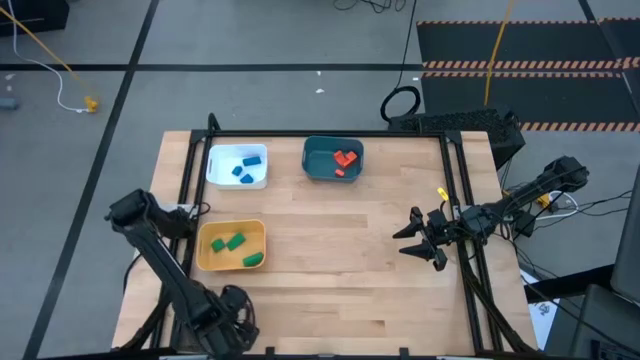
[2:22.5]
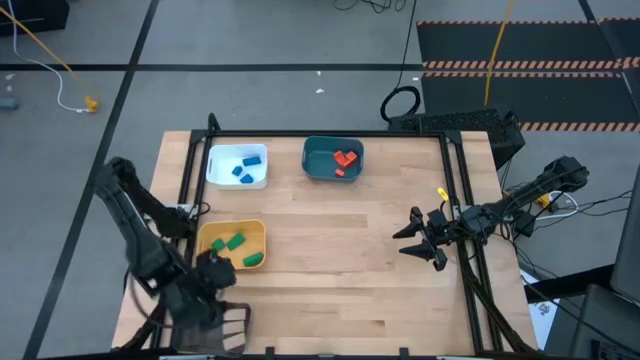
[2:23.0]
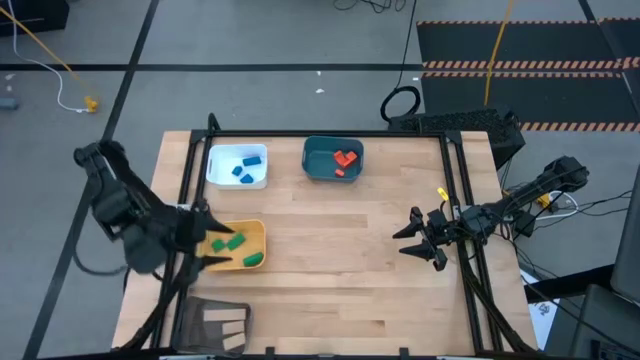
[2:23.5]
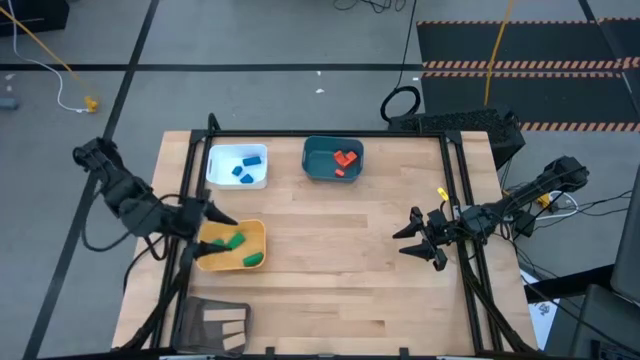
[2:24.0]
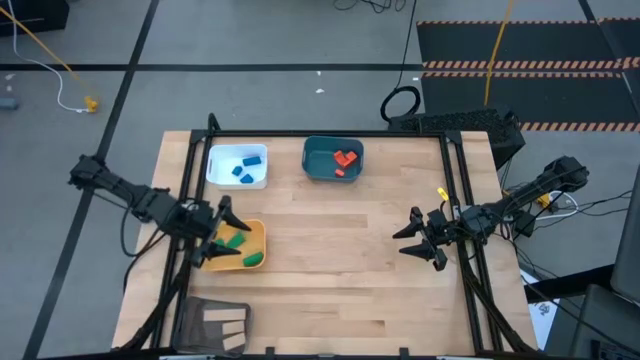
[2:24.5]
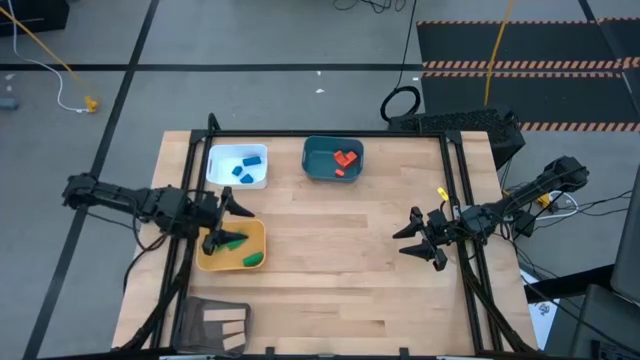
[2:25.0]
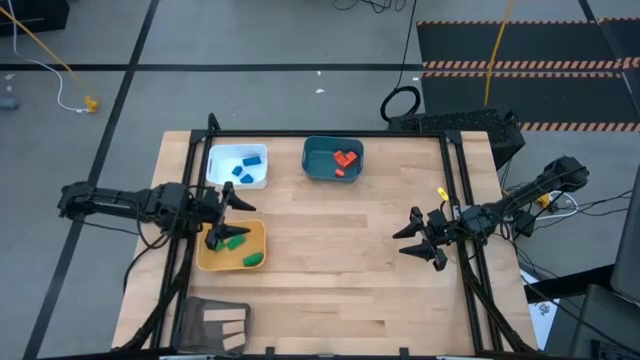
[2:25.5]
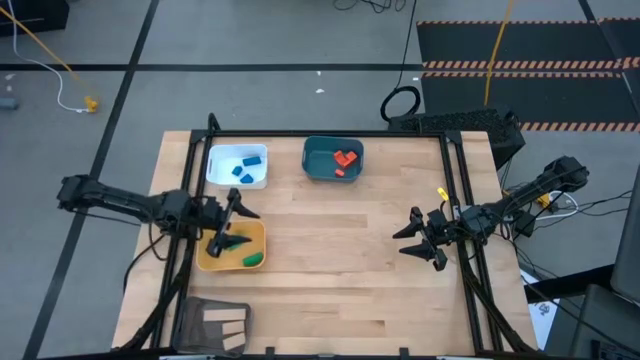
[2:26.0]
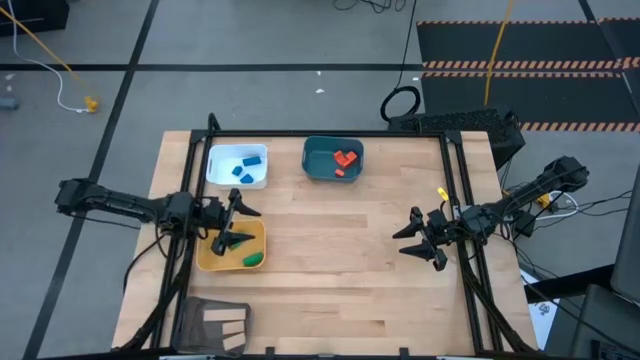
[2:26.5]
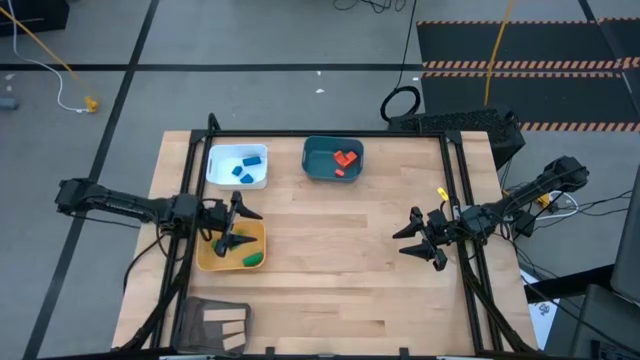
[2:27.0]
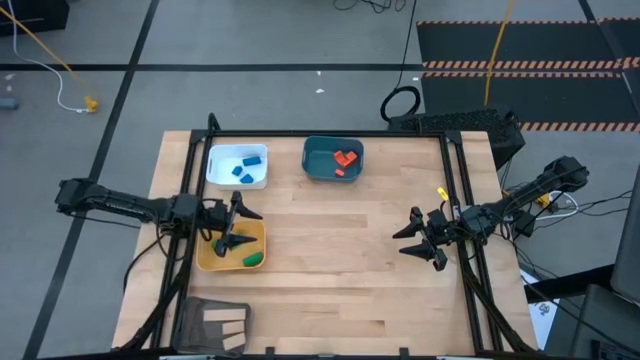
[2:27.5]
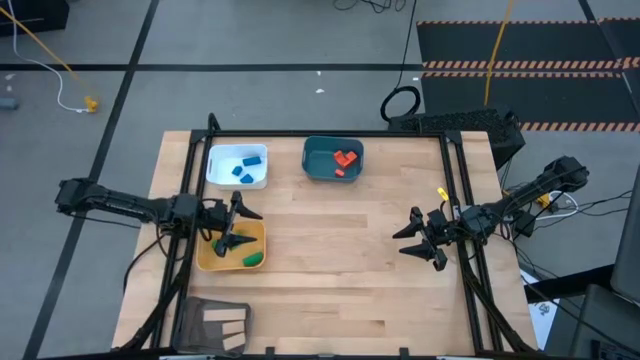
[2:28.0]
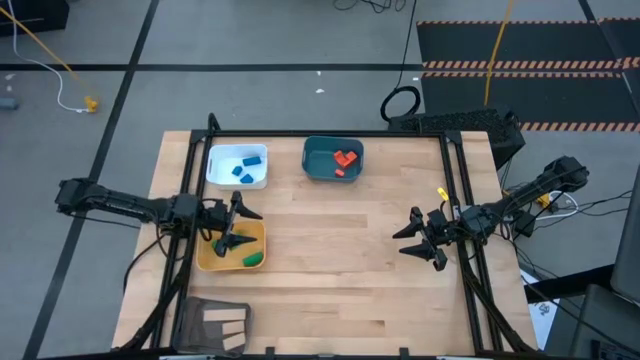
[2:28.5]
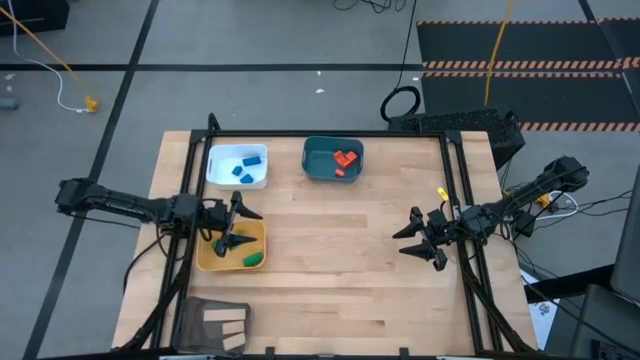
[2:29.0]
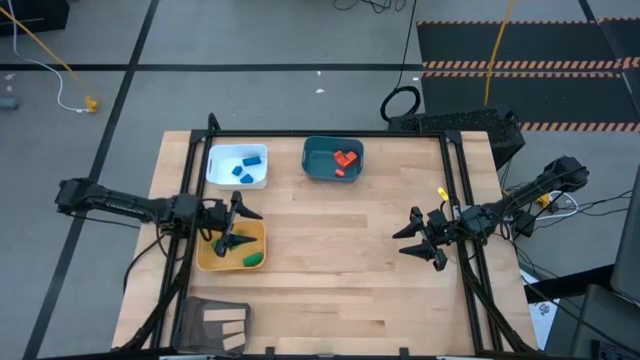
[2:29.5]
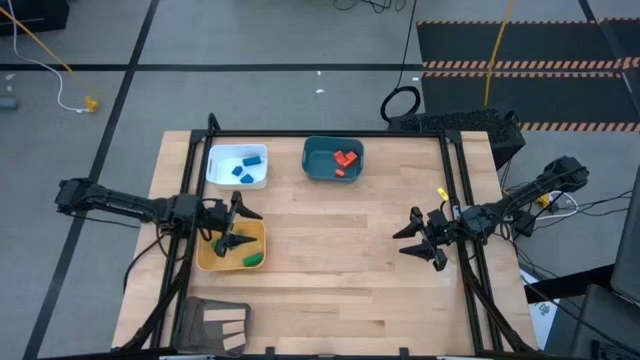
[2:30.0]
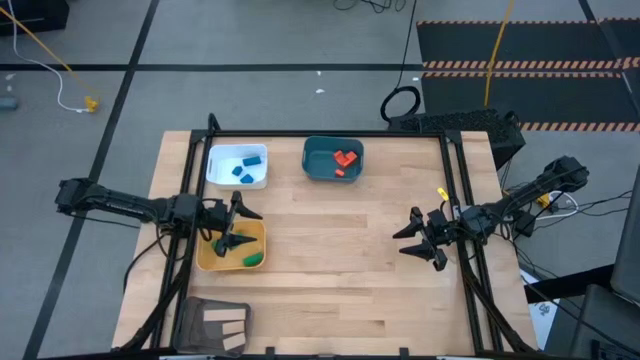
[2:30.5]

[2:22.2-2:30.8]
Task: Sort & place blocks by color
Return to Home Position

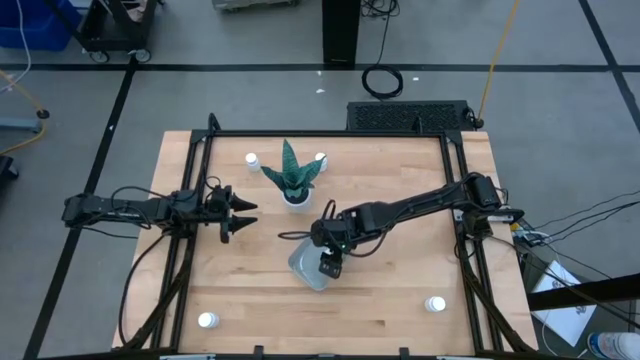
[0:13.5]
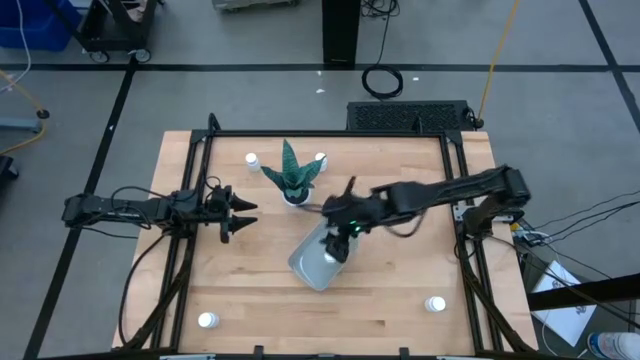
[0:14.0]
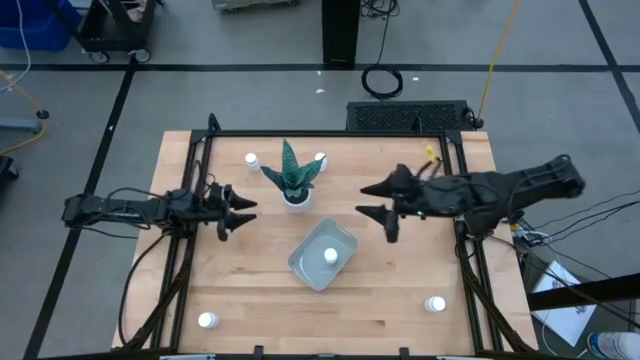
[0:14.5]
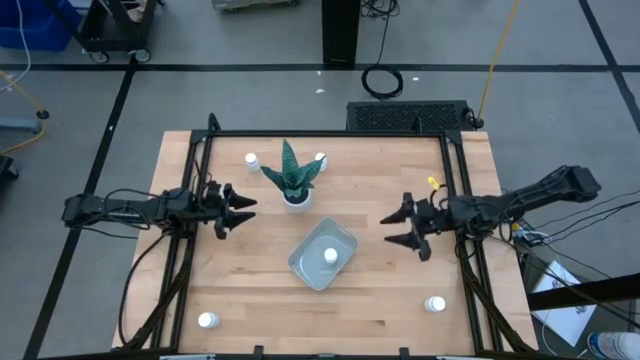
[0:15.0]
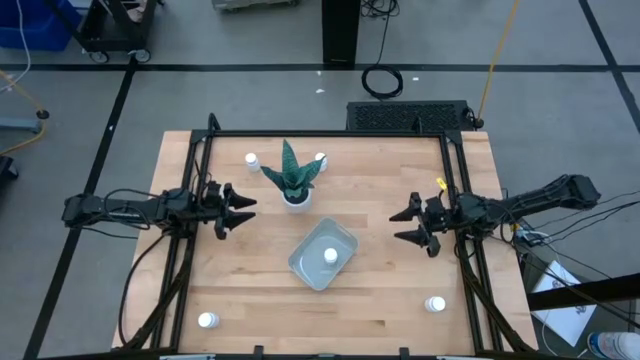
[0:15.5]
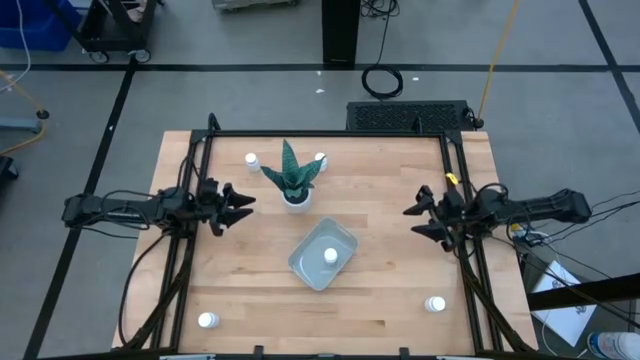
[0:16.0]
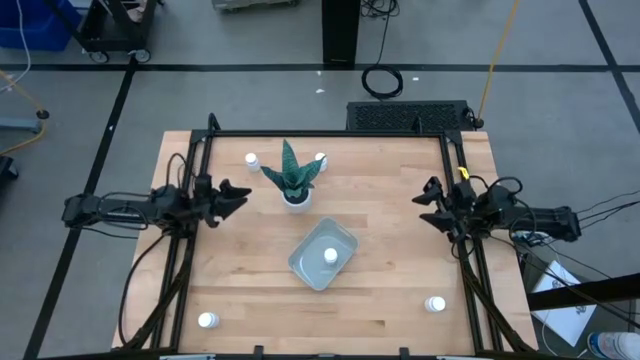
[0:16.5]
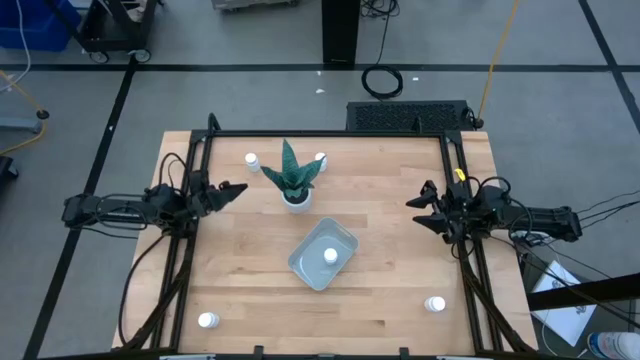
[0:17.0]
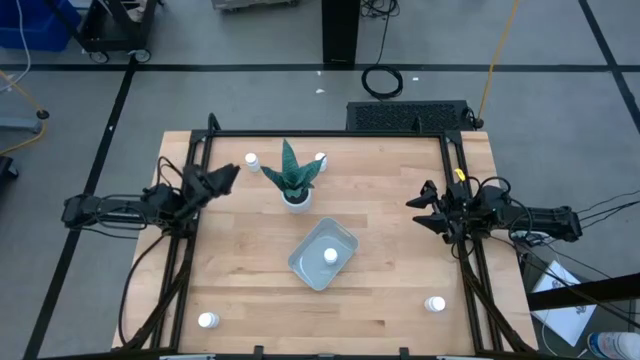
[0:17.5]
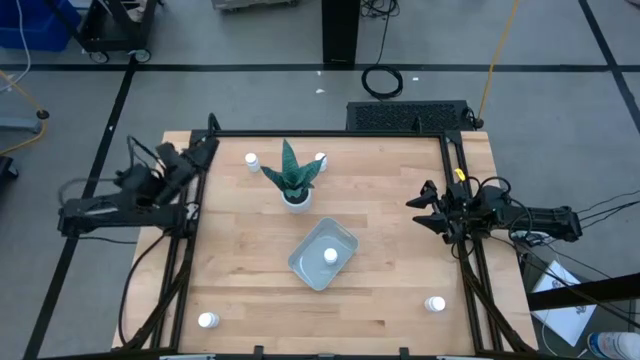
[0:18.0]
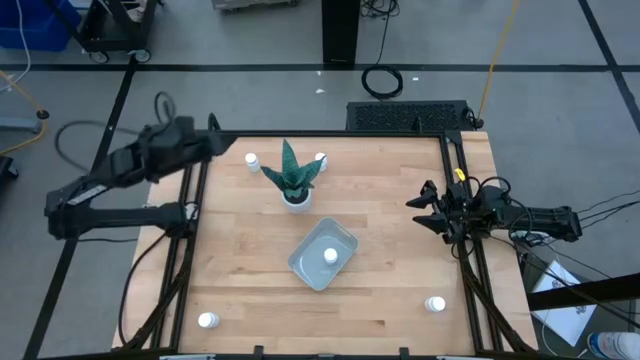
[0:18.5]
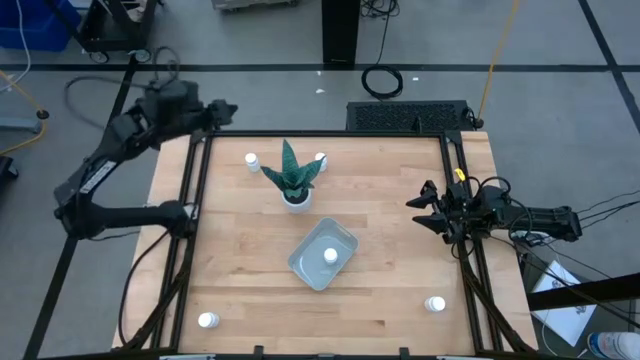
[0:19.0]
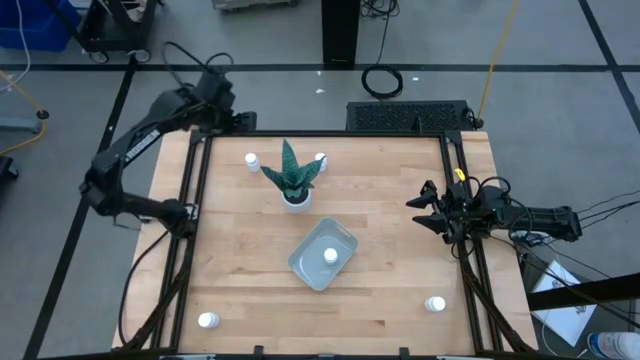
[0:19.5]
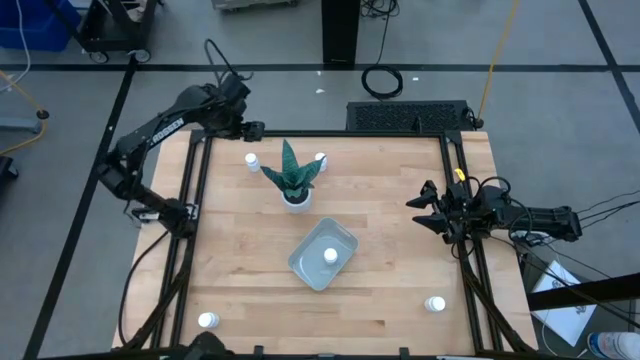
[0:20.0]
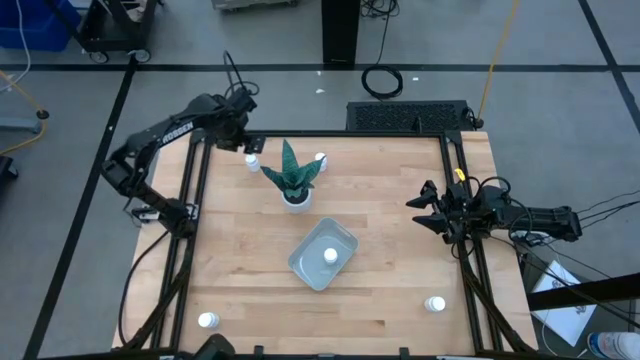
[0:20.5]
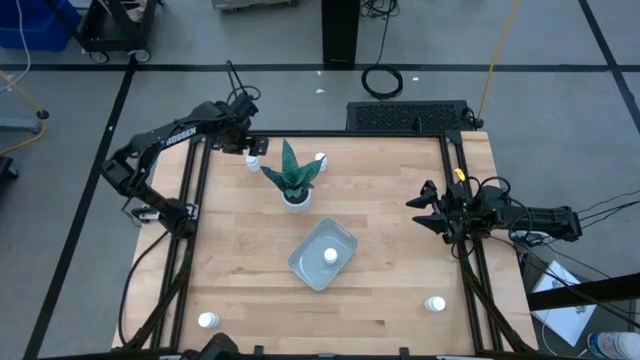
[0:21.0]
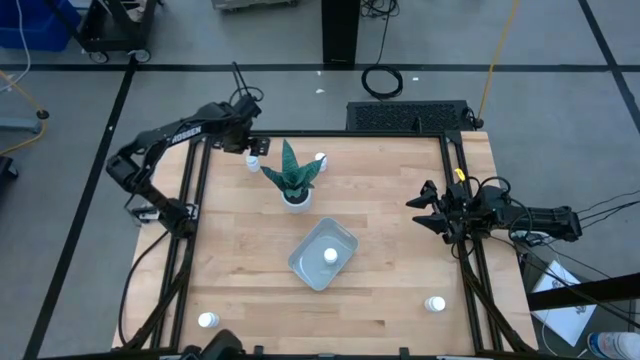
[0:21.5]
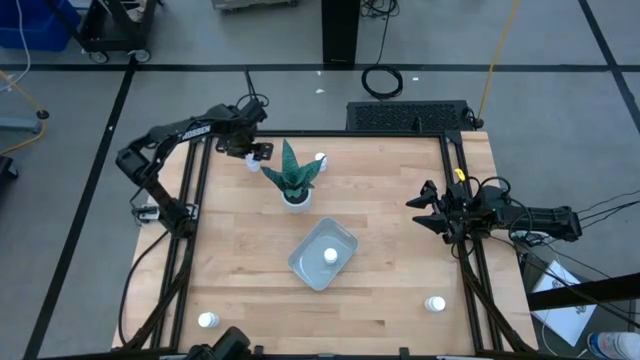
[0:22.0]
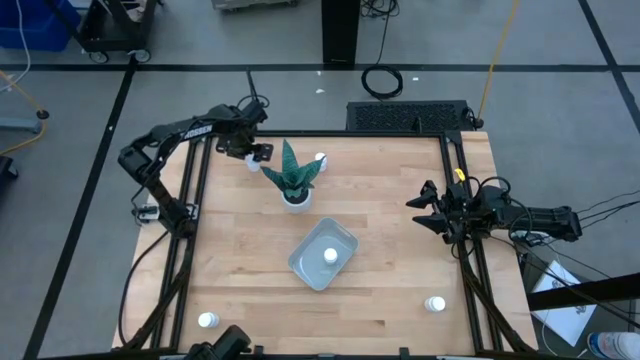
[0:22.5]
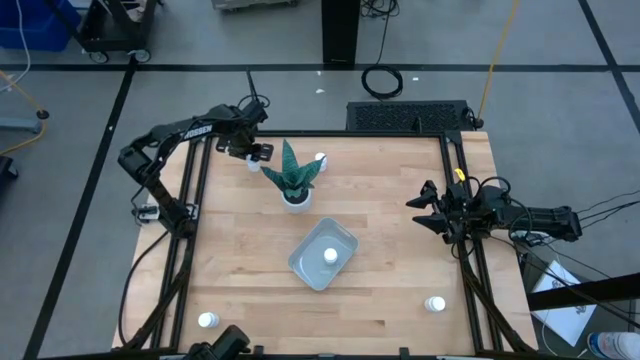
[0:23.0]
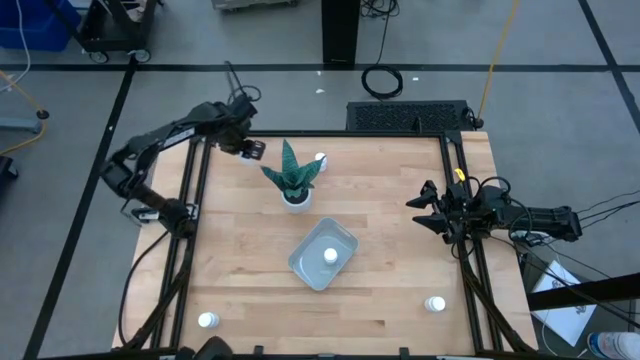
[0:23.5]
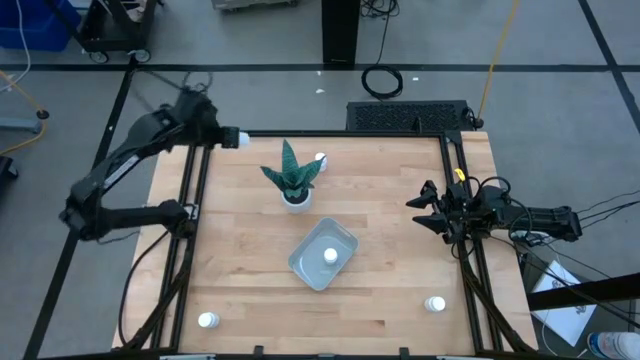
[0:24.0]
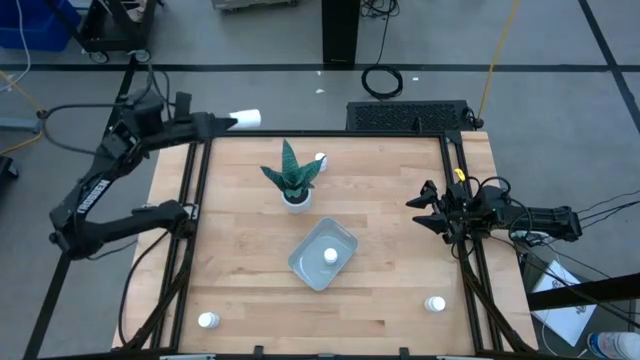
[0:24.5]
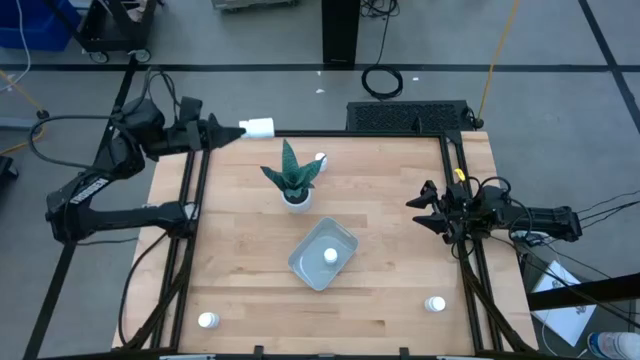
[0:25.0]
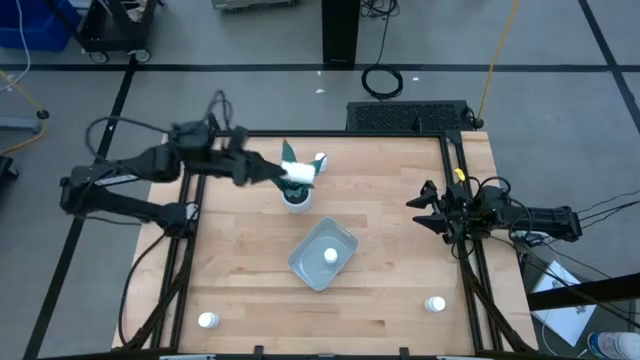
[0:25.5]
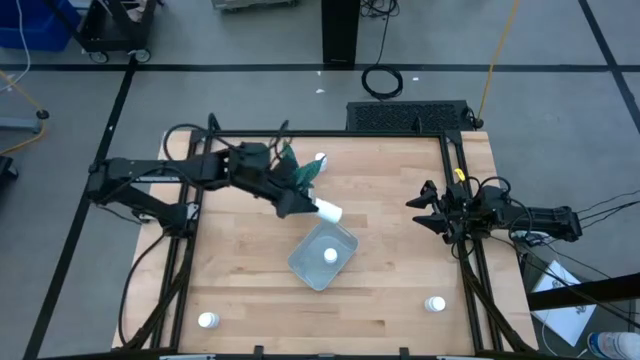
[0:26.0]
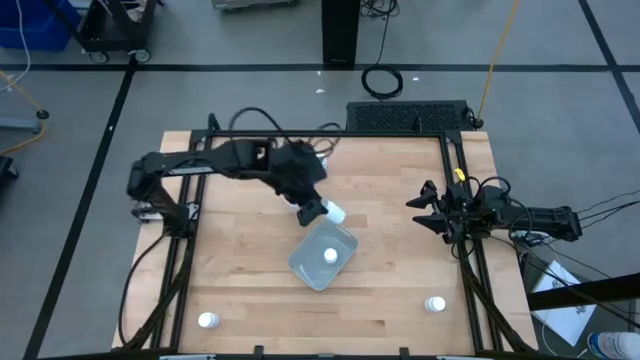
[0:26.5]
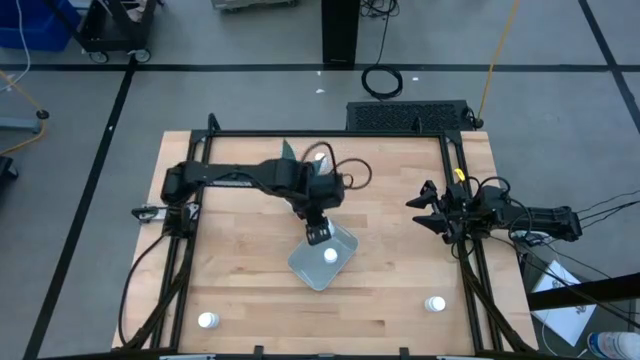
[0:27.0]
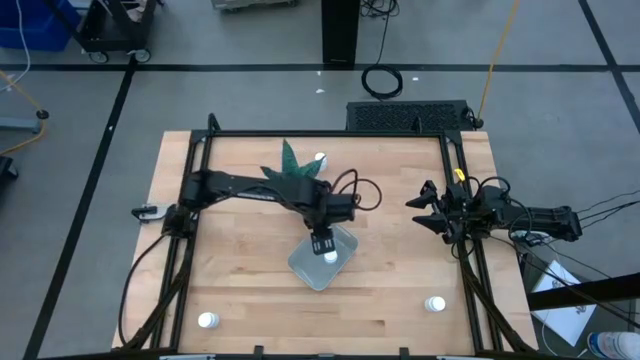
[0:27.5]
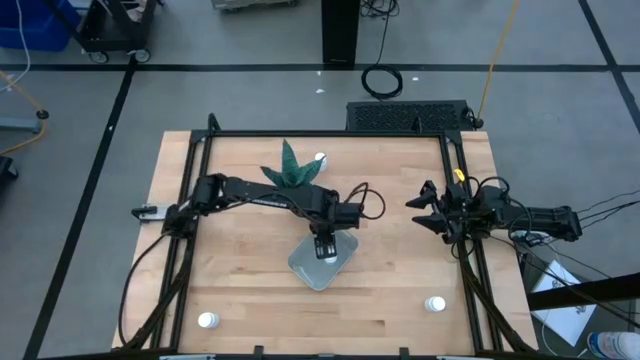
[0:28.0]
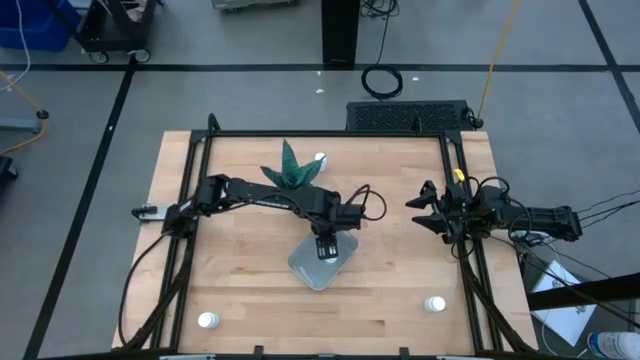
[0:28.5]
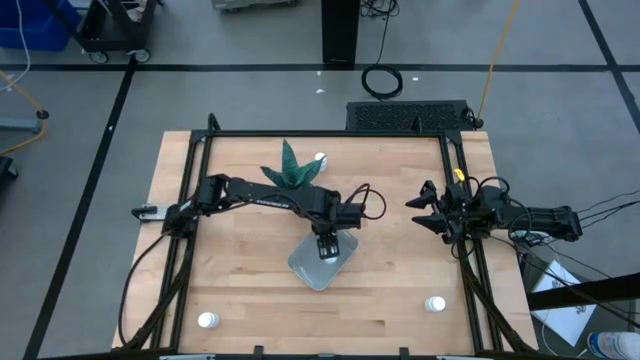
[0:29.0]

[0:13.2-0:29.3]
Task: Pick and place pill bottles into a basket
Put the white medicine bottle into the gray bin
